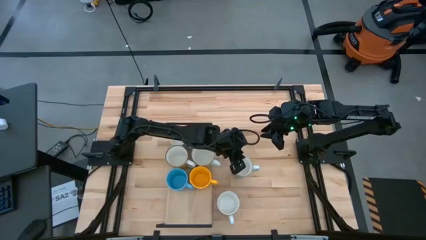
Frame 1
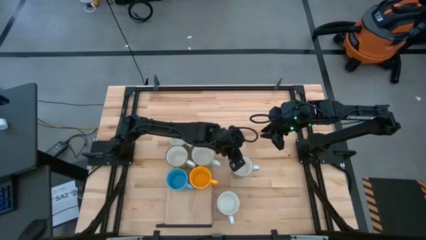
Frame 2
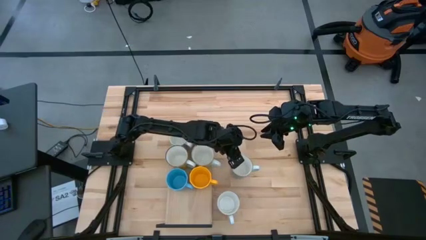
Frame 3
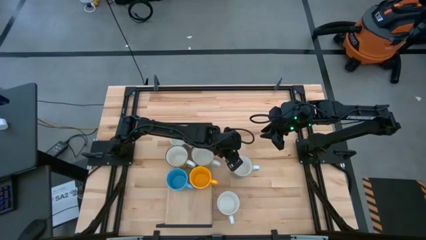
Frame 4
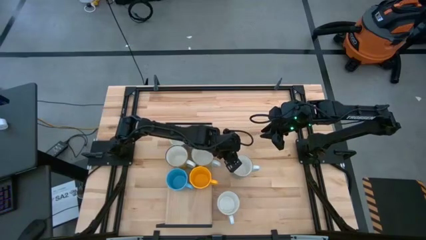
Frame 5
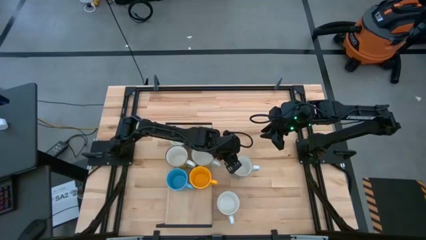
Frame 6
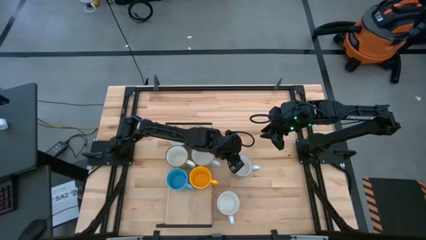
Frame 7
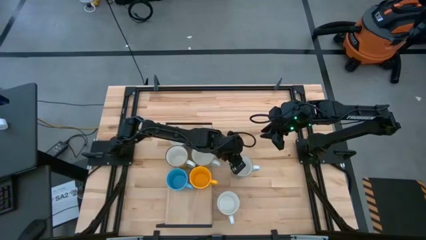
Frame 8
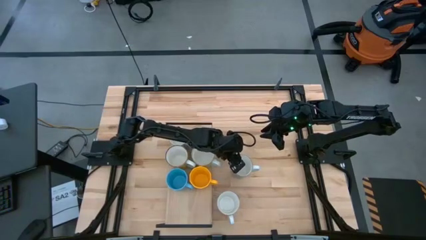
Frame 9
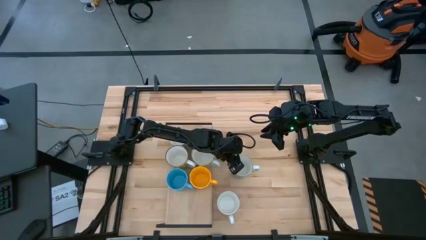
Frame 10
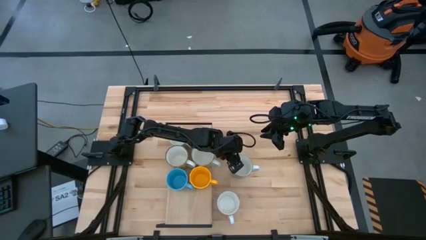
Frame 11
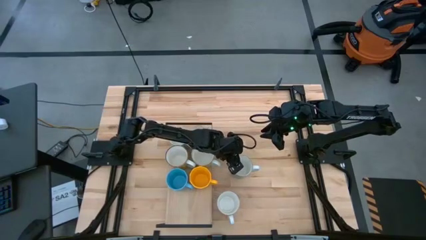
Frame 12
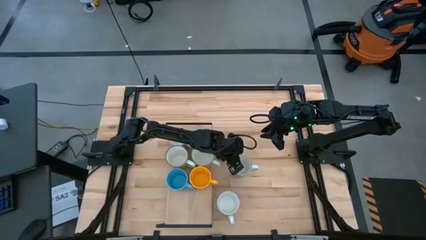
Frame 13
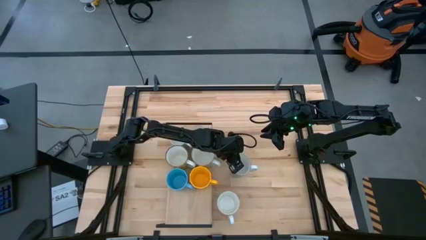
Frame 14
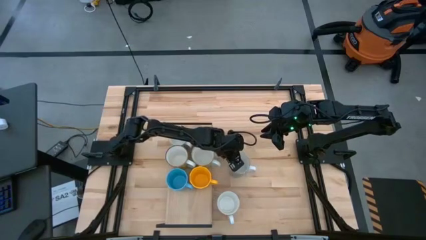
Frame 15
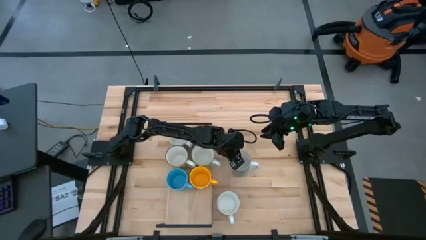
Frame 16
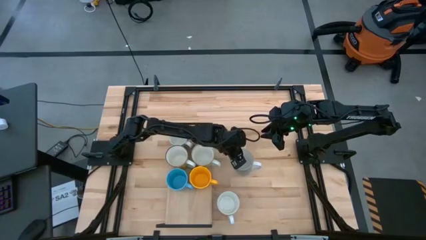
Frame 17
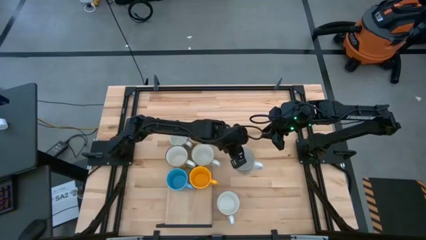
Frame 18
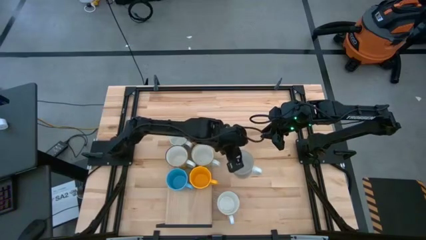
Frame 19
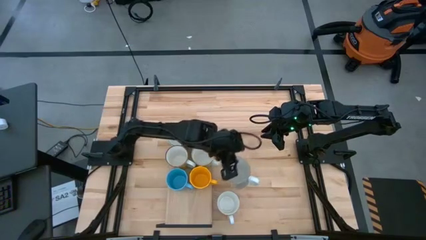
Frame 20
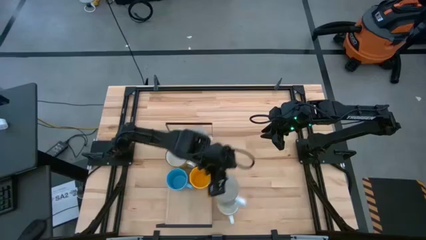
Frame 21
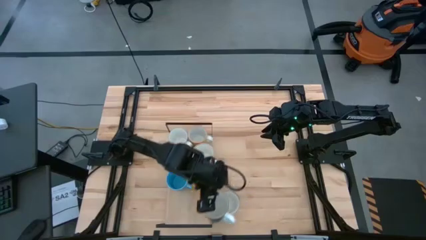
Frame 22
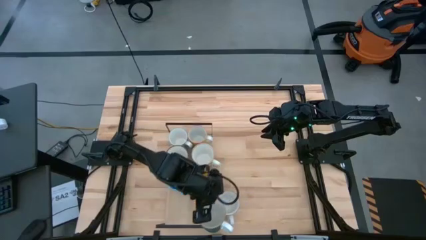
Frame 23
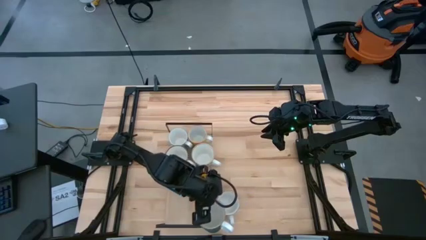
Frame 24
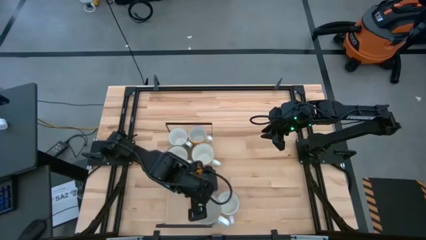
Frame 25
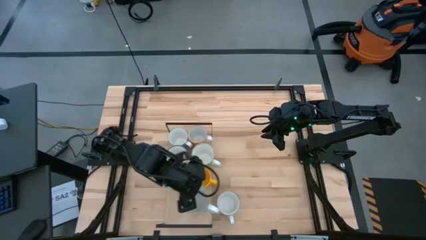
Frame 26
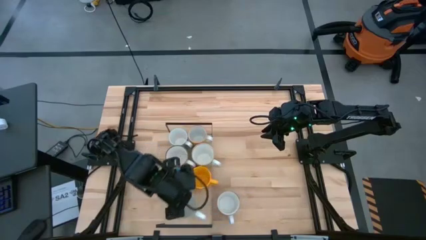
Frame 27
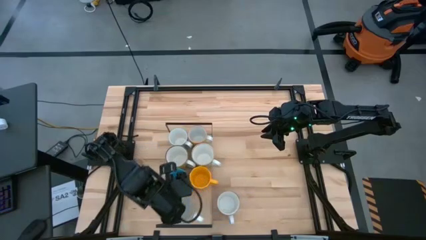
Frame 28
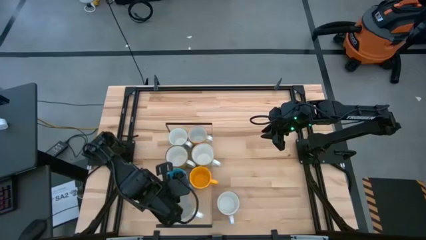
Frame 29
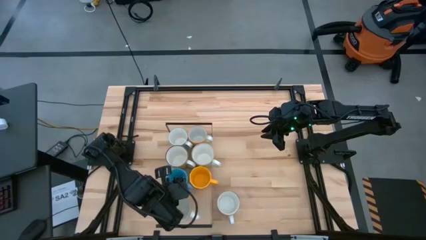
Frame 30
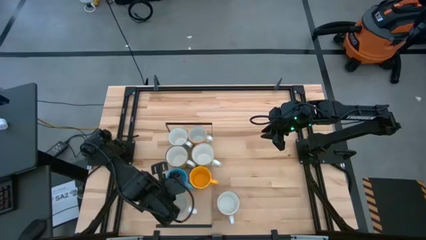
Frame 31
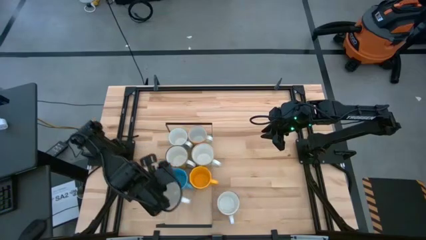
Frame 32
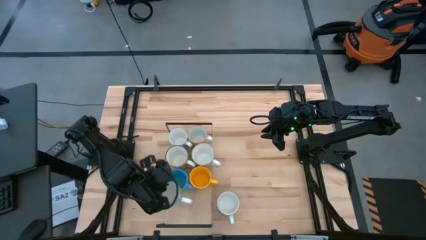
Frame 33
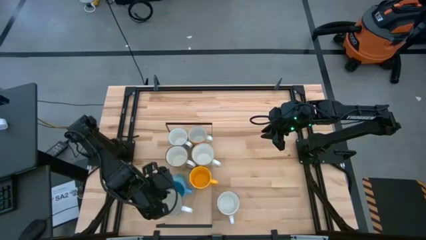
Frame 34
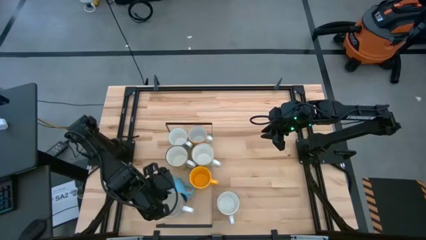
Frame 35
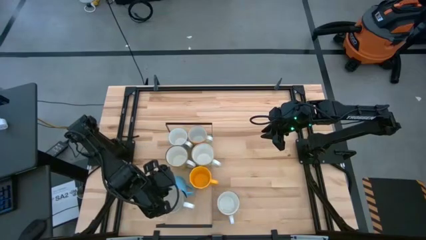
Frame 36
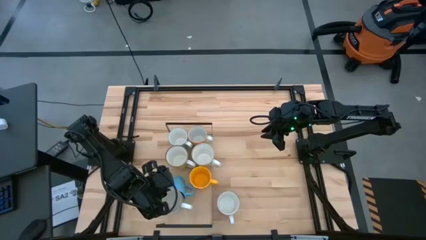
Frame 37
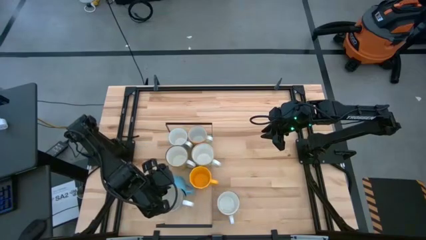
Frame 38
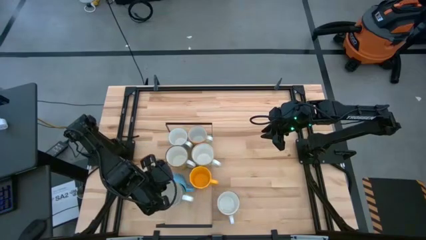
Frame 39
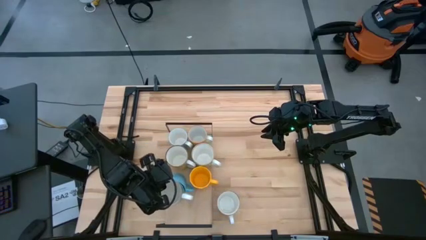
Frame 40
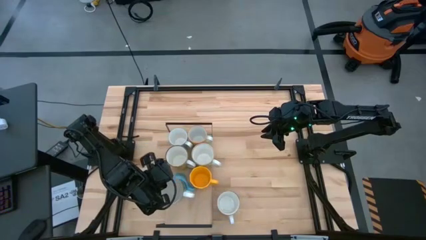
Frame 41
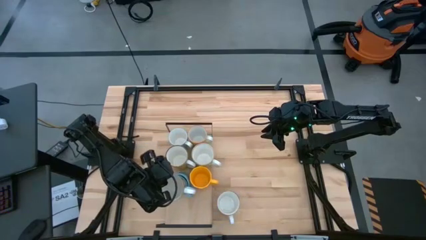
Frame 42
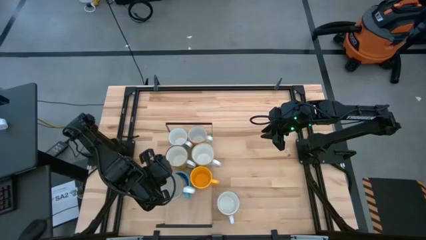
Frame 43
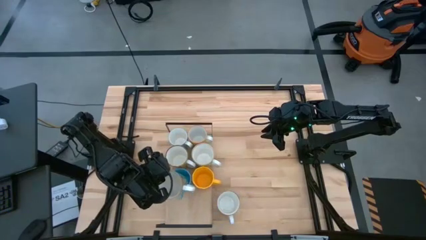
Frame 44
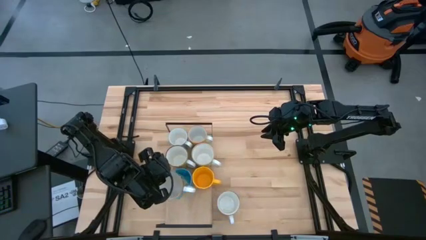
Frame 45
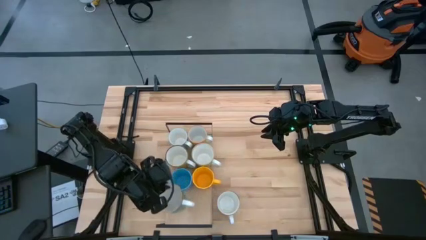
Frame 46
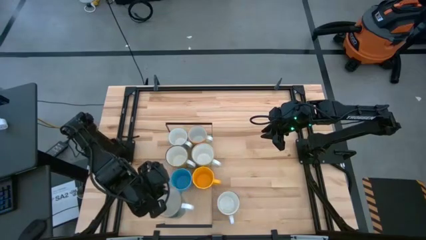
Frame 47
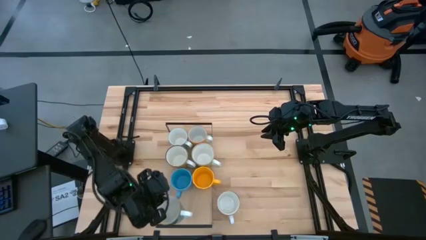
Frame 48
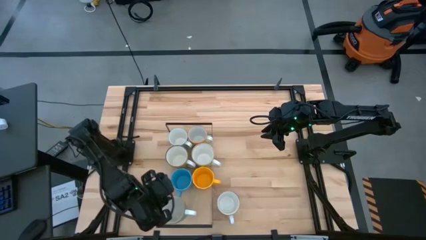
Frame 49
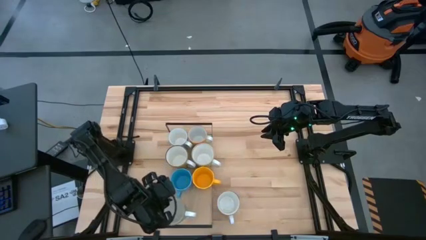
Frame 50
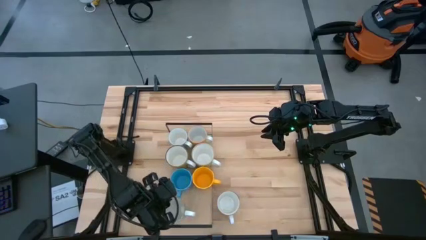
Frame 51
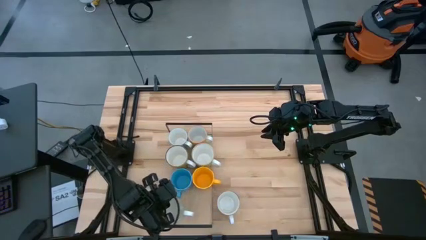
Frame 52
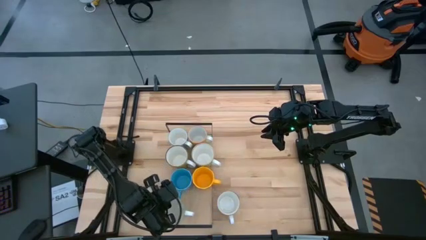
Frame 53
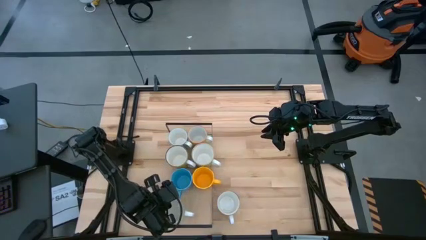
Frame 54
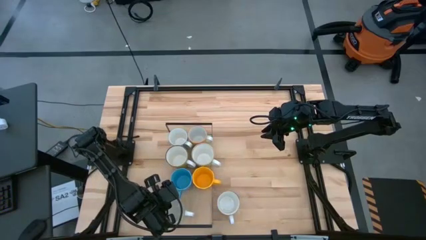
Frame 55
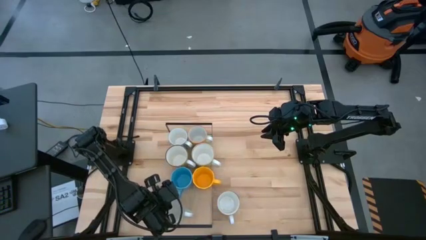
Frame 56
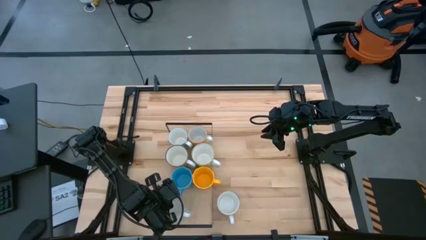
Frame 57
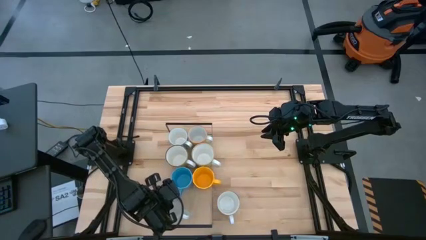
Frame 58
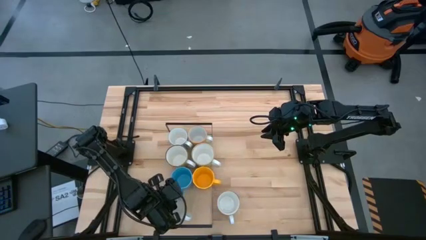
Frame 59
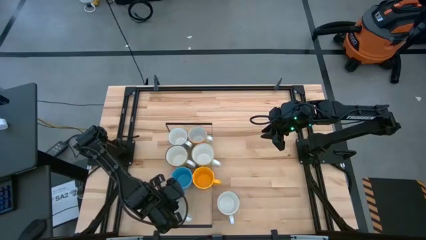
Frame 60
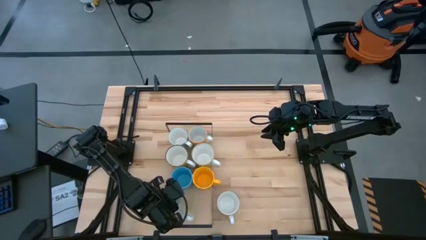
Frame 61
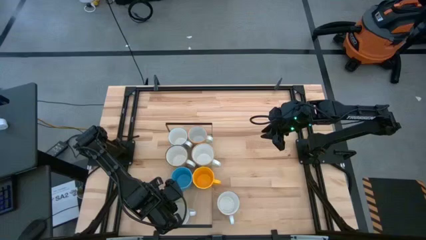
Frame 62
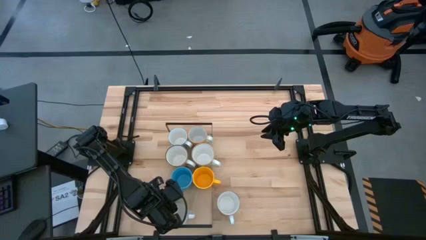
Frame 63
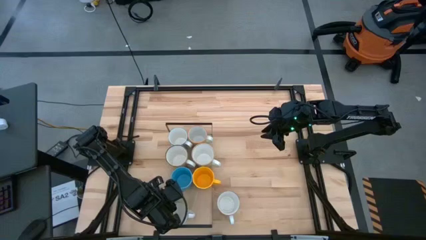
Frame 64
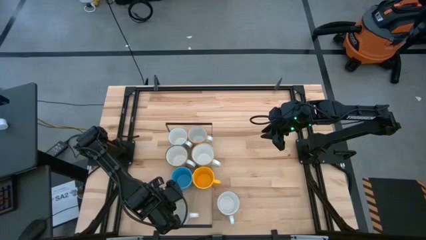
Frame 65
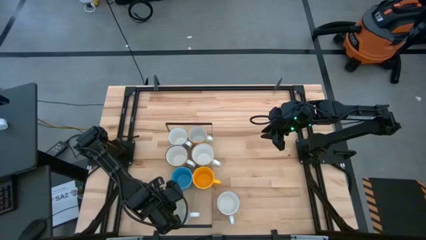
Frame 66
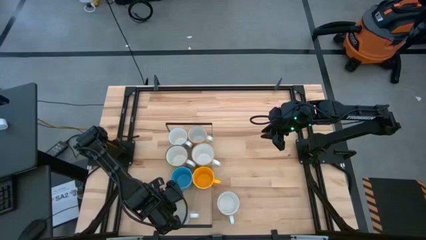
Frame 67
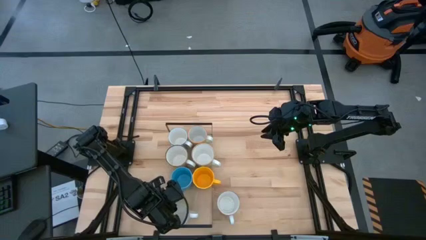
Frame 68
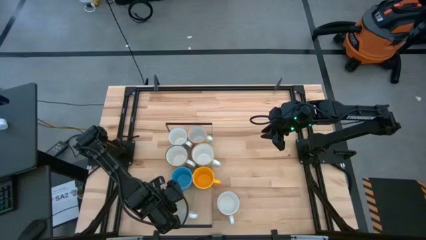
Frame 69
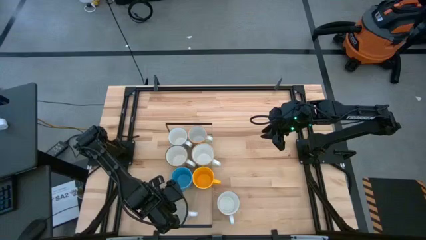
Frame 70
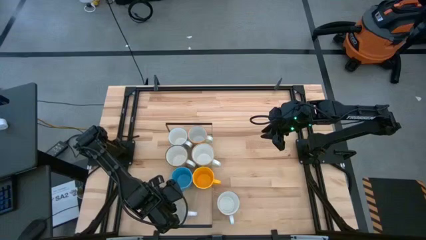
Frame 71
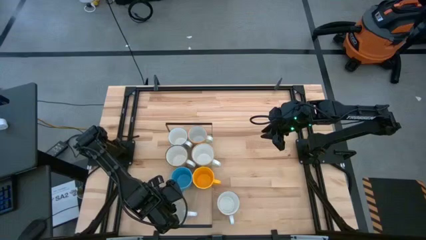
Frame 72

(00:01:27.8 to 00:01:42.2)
Task: Place coffee mugs
Put the light blue mug on the shelf

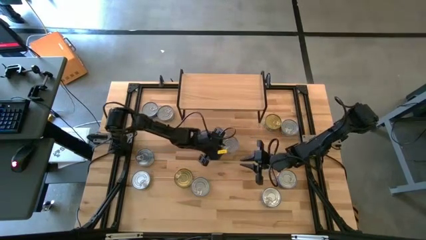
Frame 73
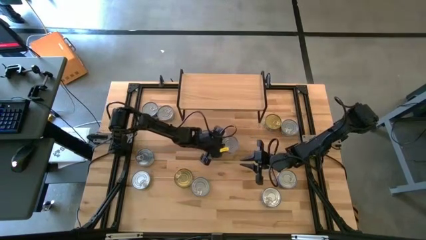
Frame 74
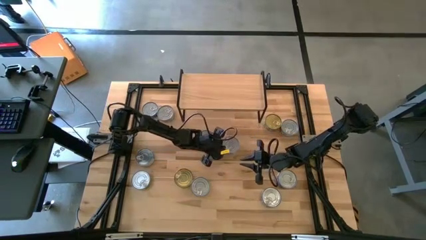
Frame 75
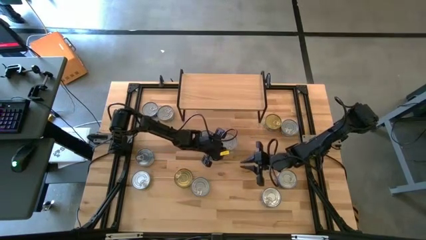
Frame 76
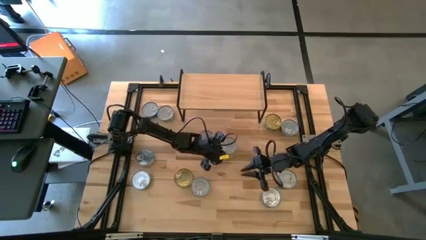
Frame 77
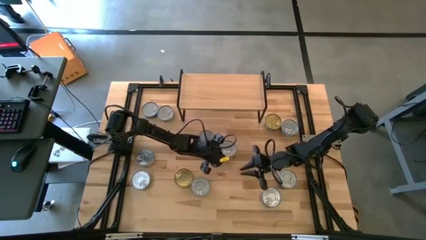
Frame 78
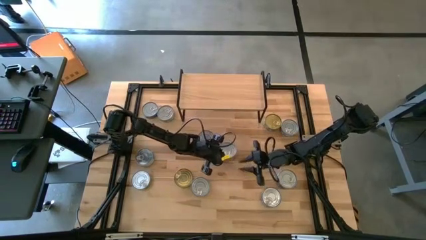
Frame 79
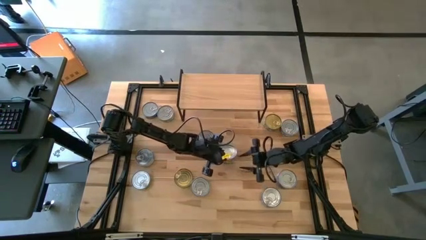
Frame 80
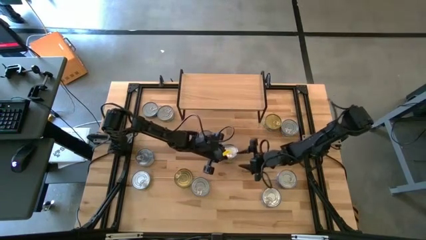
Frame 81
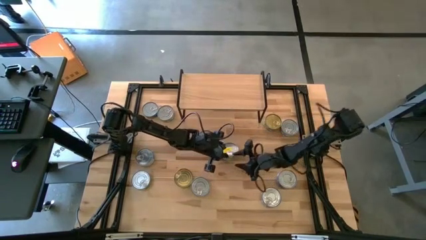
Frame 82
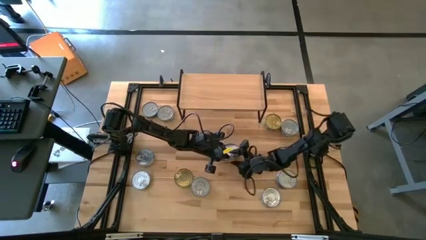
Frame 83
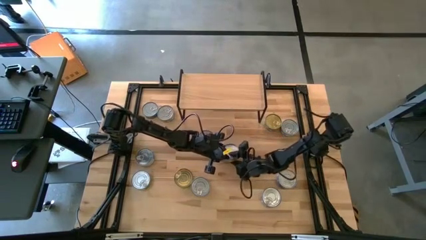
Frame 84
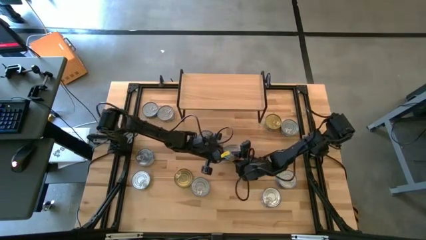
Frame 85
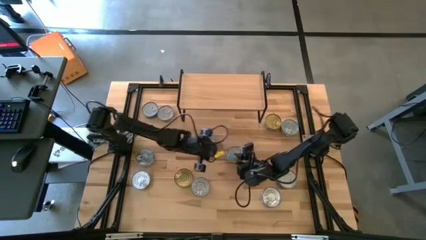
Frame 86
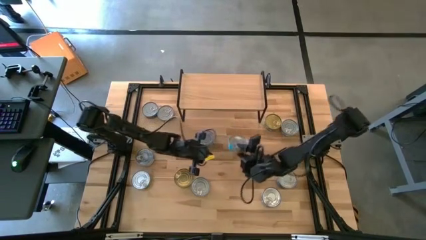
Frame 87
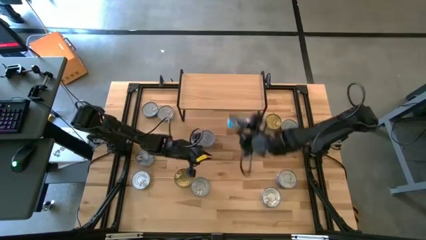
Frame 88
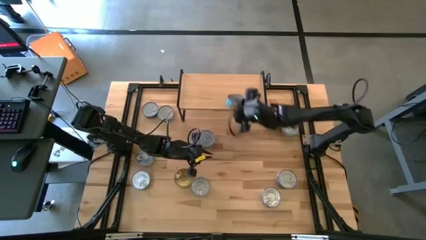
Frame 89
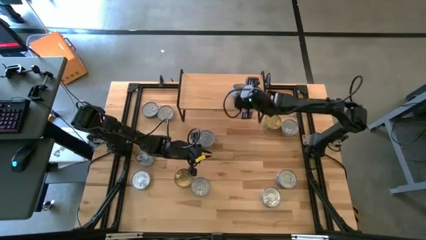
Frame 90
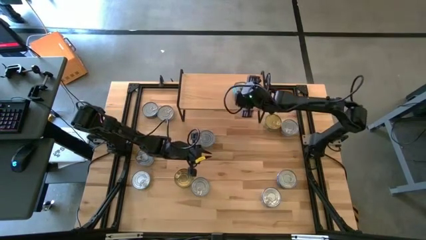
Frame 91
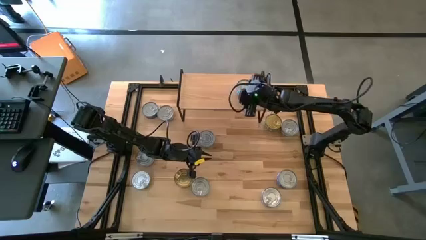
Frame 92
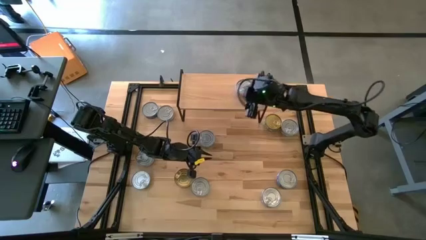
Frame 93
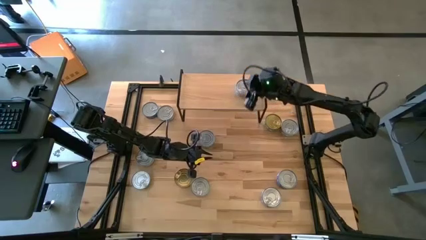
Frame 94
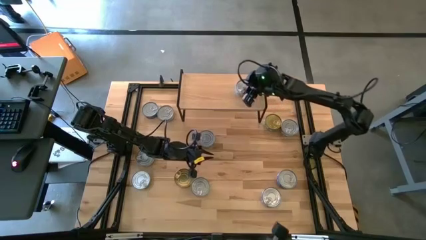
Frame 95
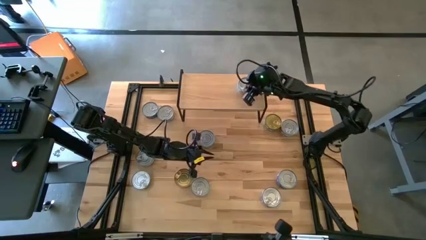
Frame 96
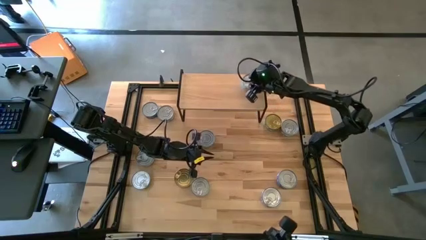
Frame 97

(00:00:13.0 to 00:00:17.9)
Task: Stack canned seafood by type on shelf
Put the yellow tuna can on the shelf
